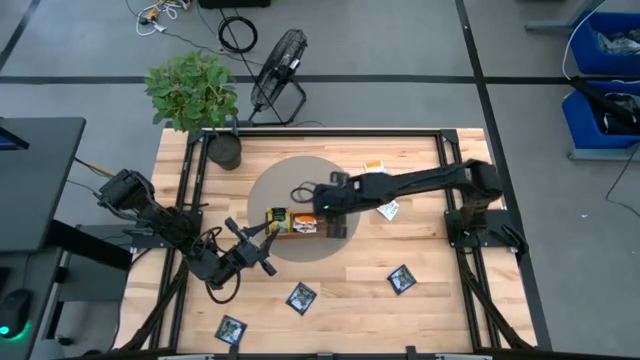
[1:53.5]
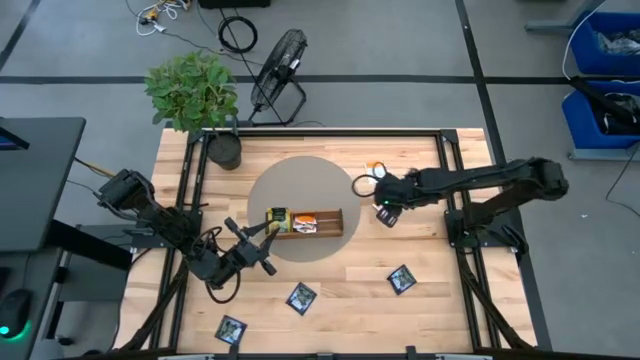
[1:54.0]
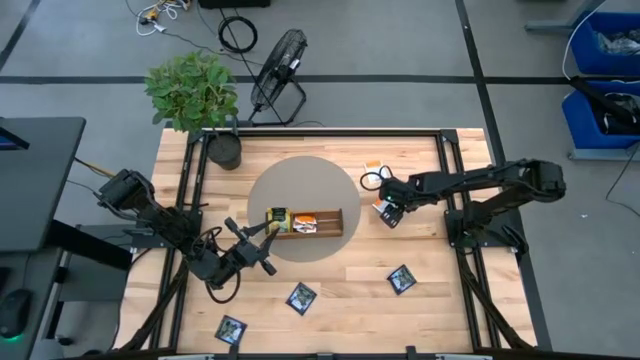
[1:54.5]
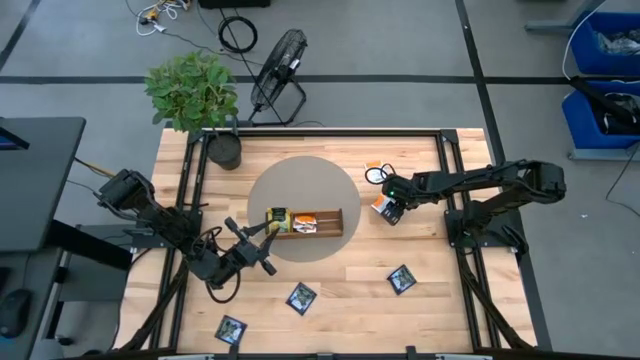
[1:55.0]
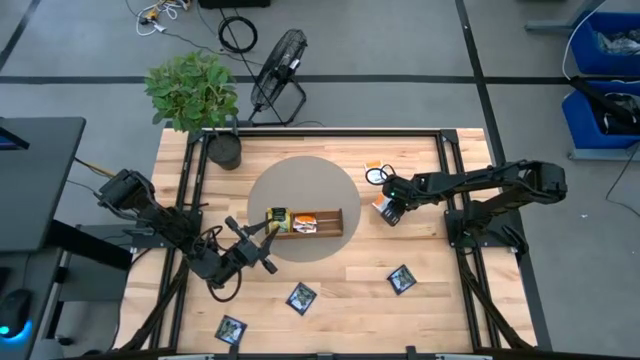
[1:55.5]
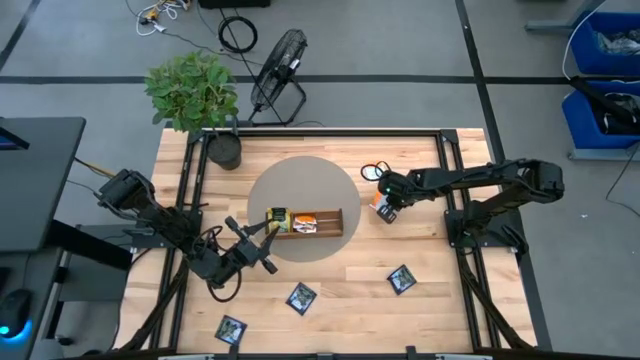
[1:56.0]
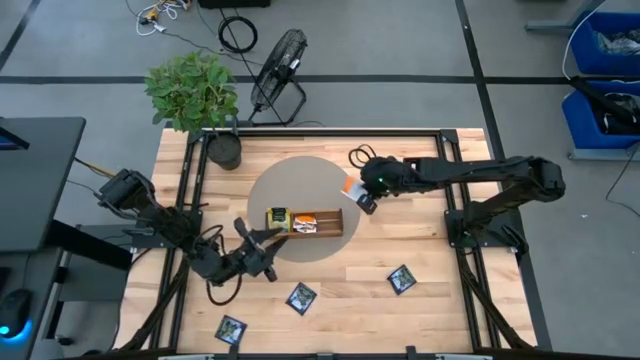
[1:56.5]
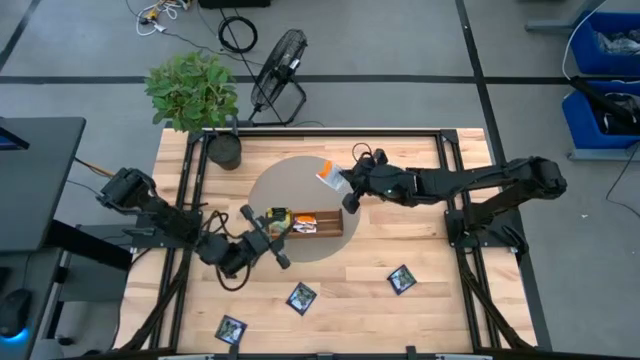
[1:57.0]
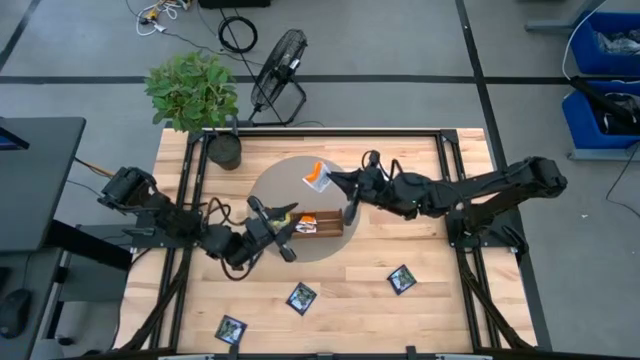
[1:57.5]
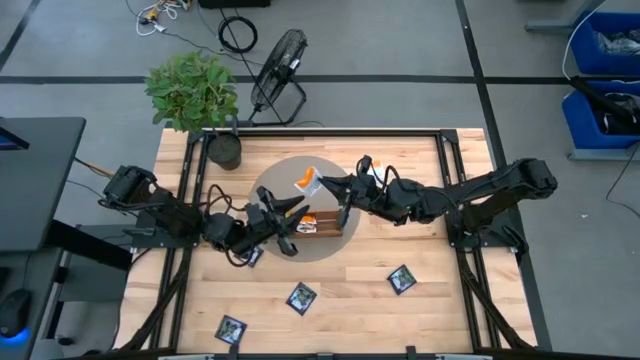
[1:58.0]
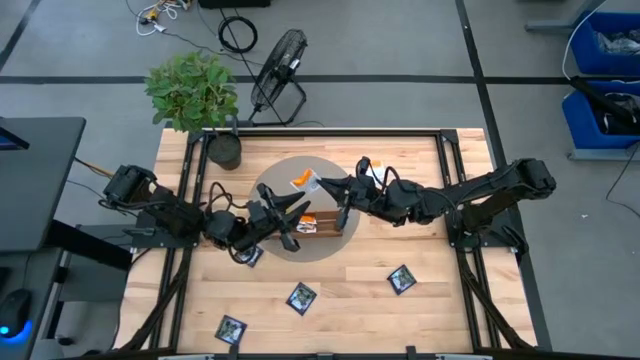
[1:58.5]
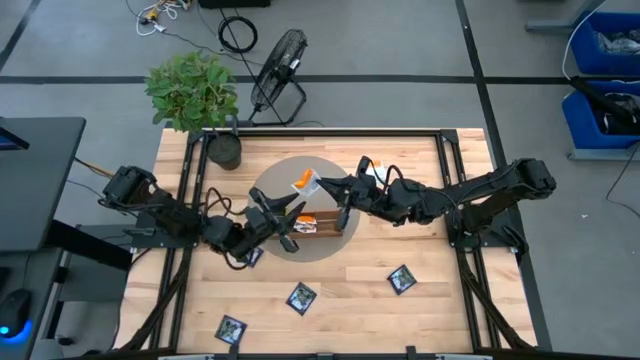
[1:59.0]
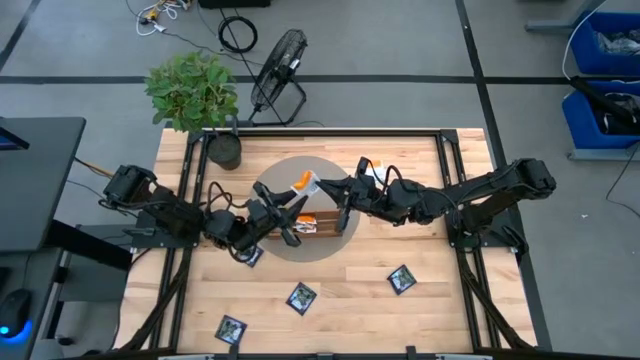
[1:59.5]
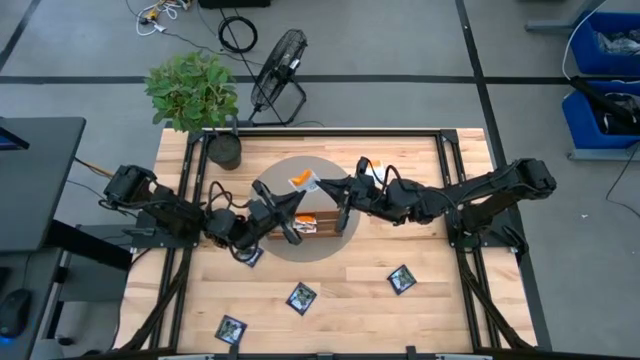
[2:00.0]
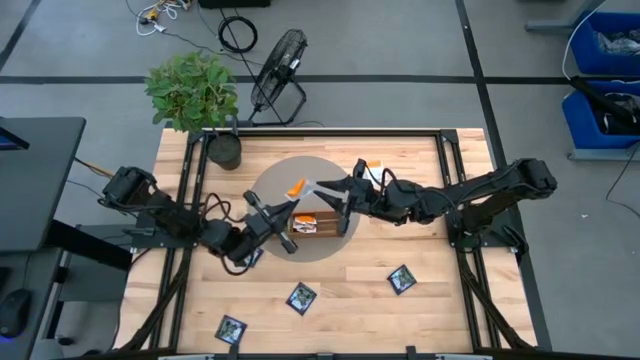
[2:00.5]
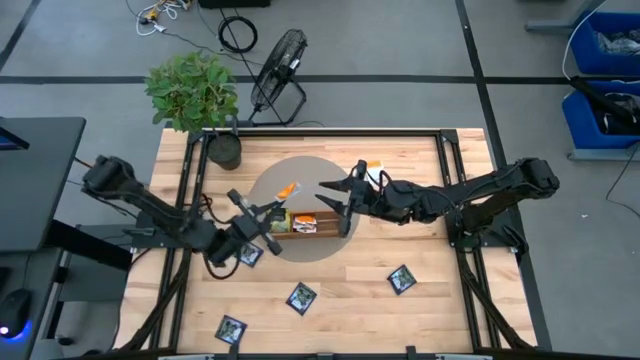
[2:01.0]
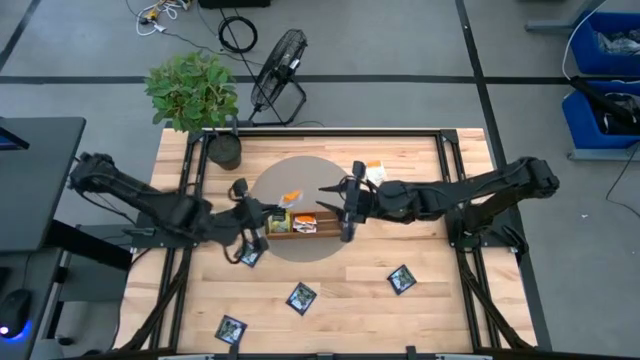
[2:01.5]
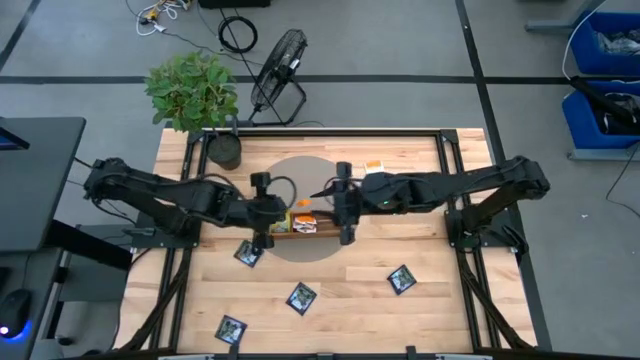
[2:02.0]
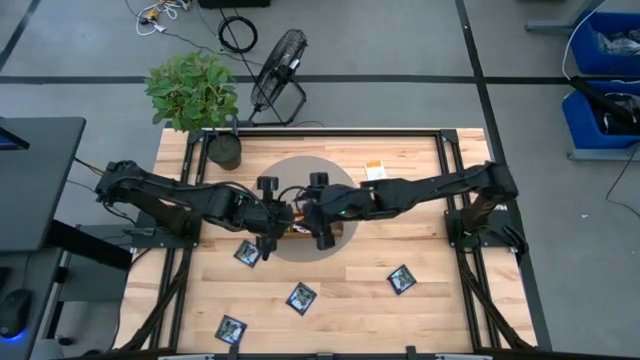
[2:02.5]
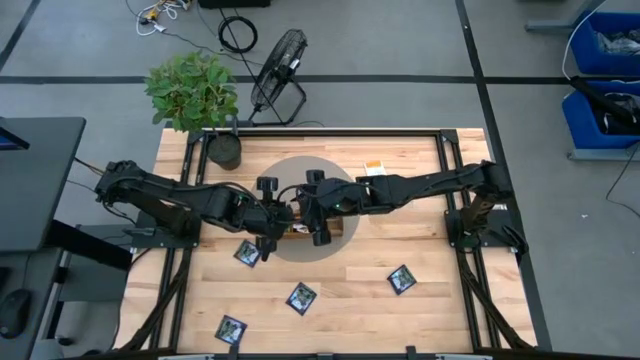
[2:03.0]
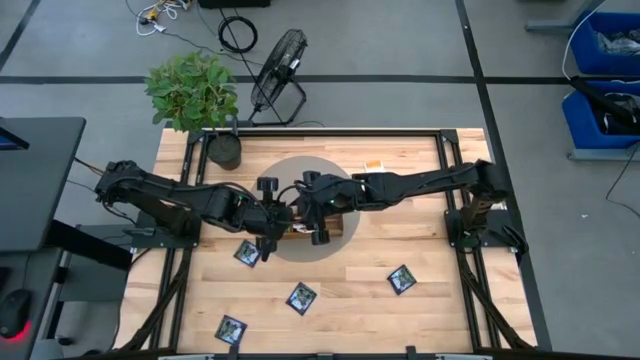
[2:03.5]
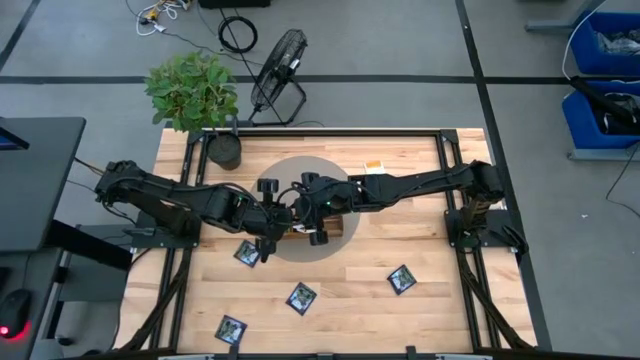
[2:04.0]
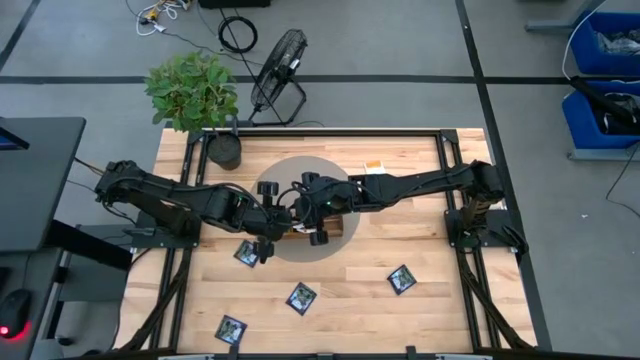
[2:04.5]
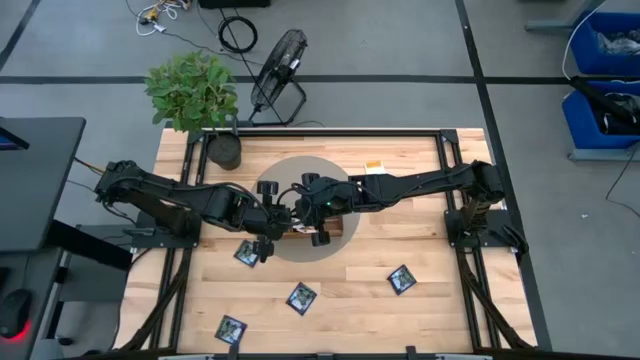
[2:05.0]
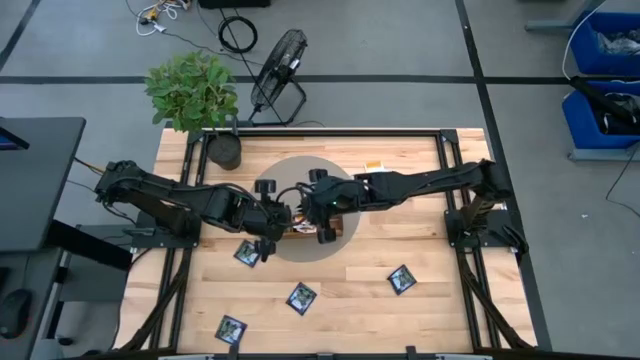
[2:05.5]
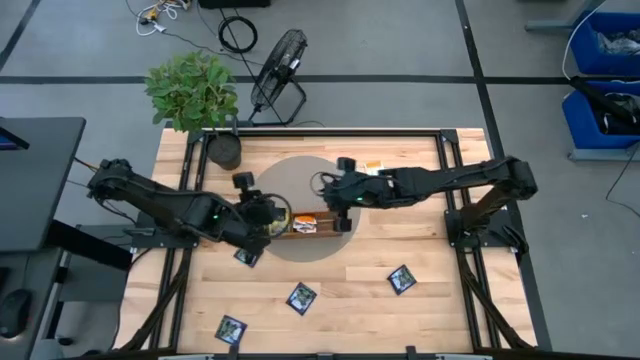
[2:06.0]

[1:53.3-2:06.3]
Task: Pick & Place Tea
Put the bottom orange tea bag into the wooden organizer

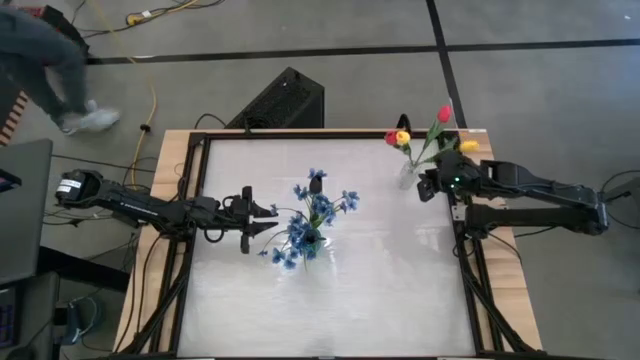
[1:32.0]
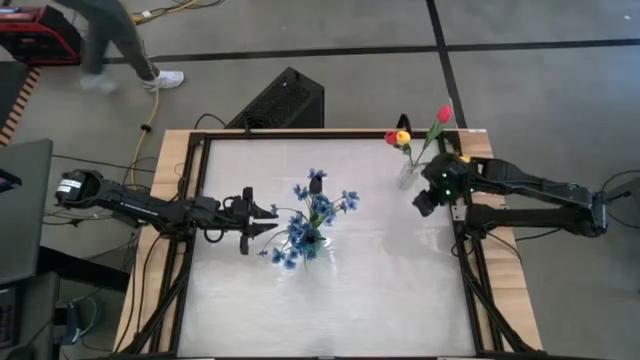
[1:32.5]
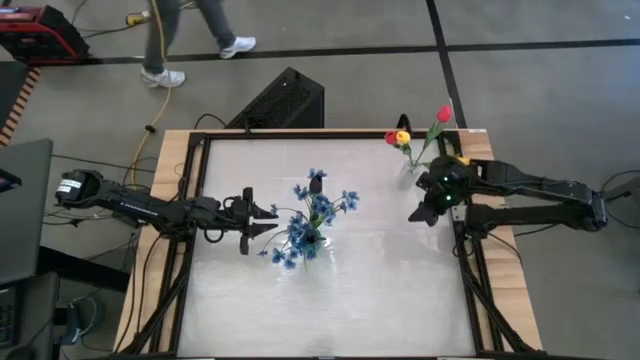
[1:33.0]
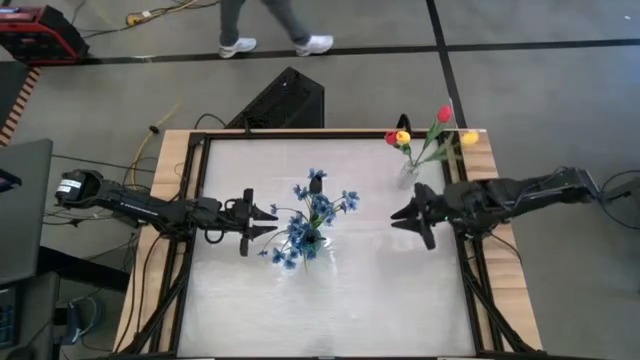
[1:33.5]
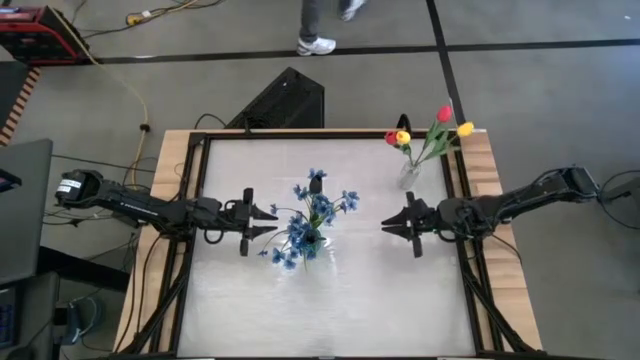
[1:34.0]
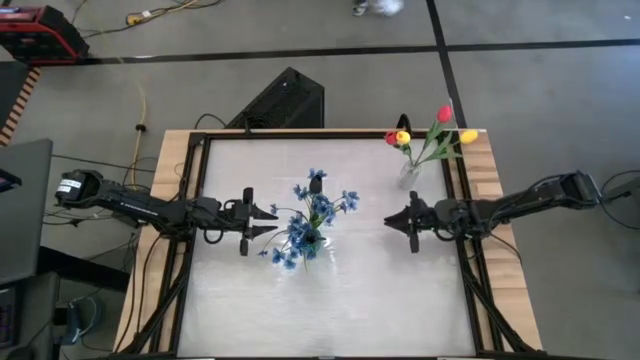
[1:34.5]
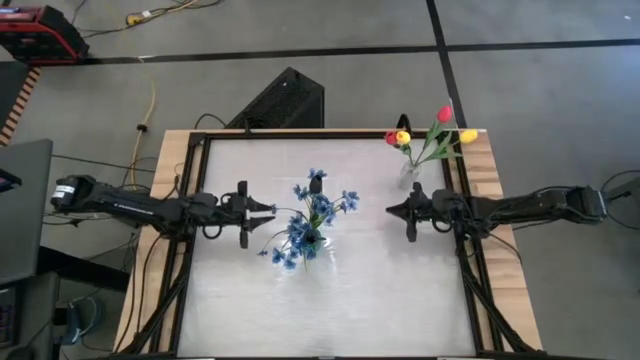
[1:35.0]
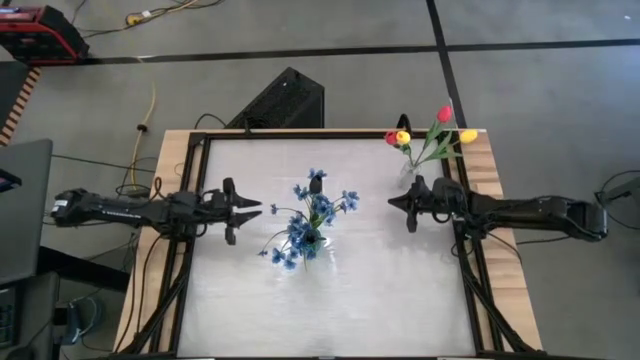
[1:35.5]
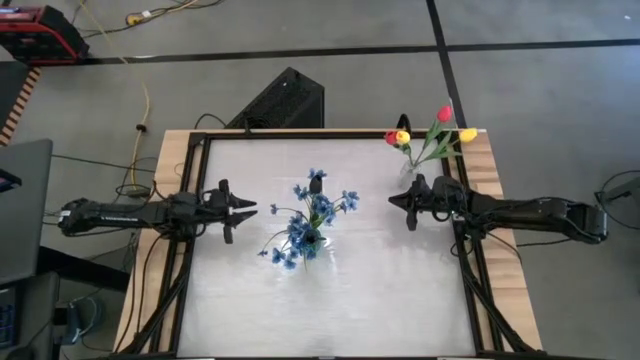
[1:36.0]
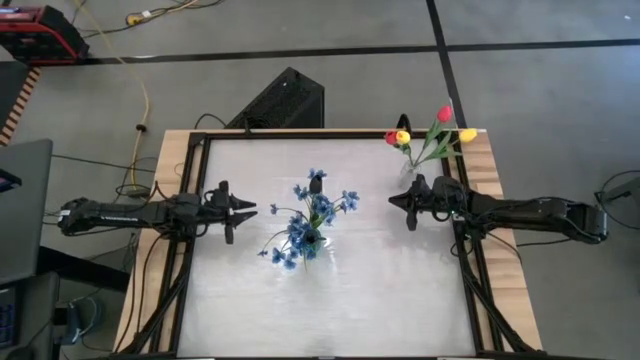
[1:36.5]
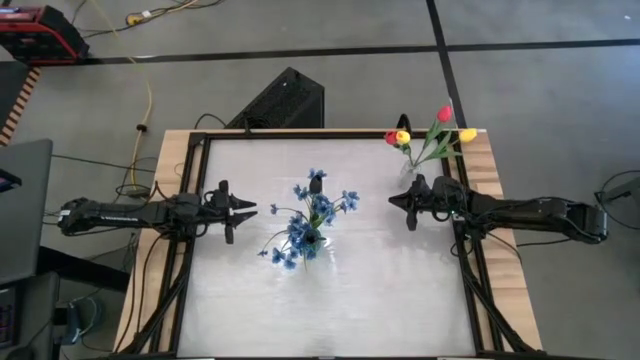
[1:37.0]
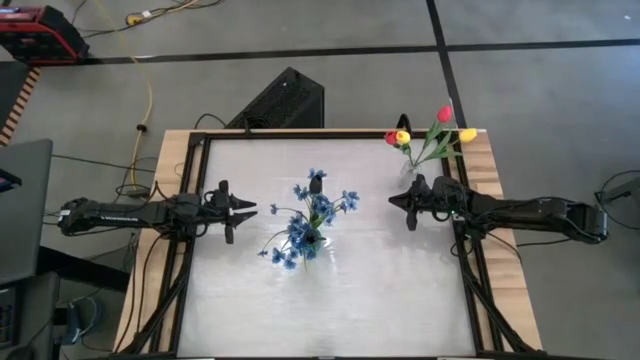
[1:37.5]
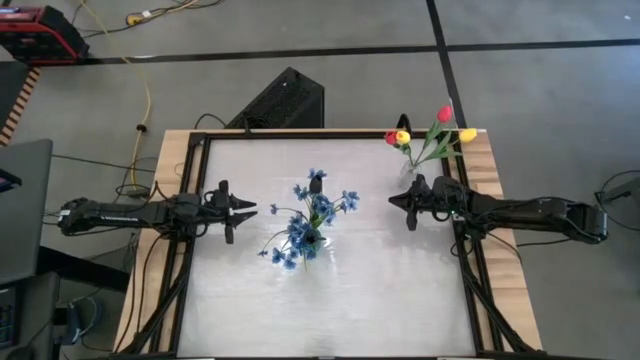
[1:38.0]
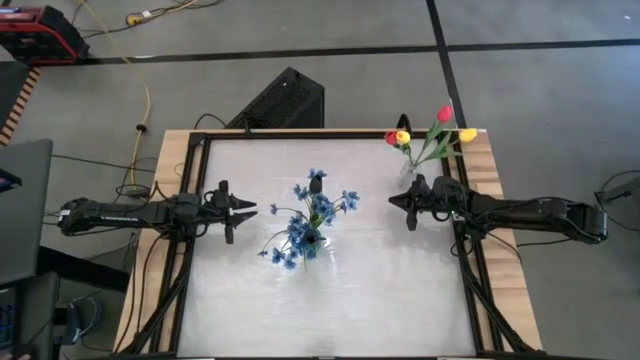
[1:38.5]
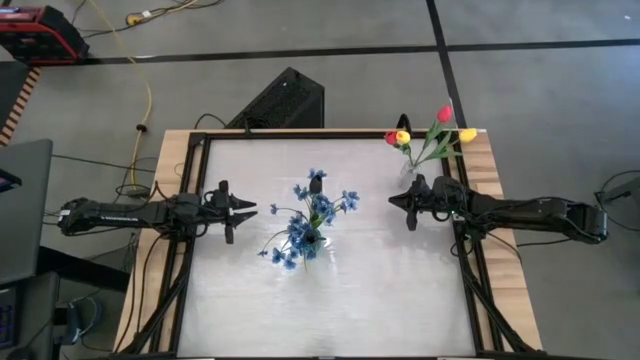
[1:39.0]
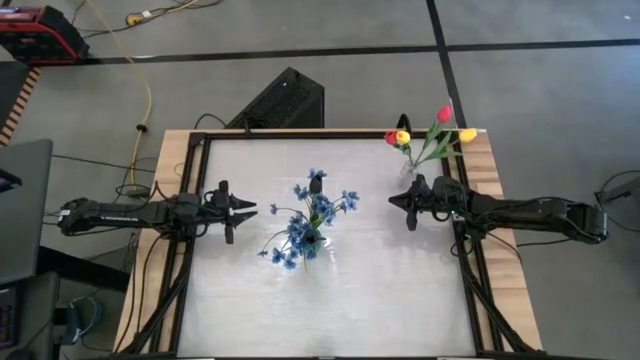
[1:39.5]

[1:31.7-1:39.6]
Task: Sort flowers into vase by color
Return to Home Position

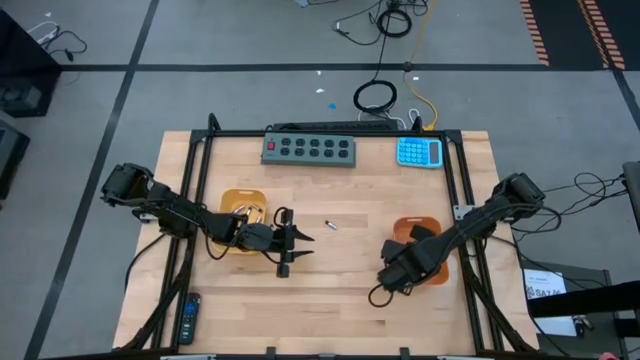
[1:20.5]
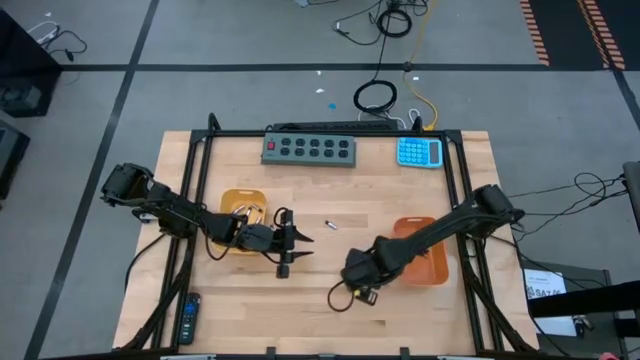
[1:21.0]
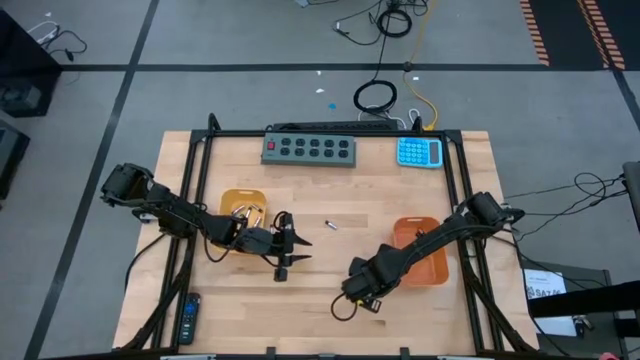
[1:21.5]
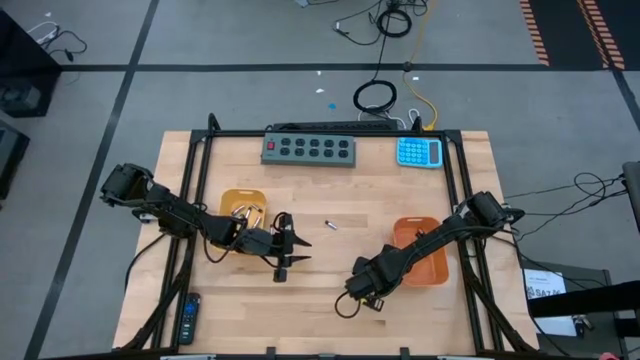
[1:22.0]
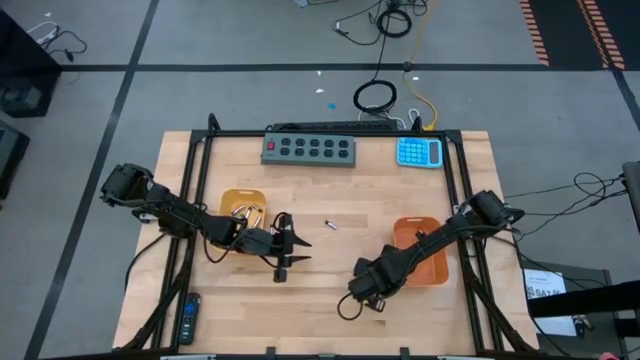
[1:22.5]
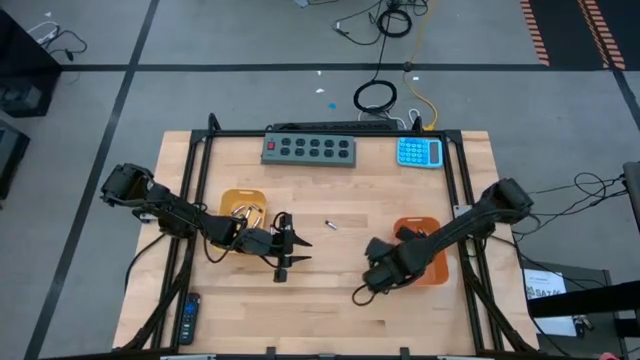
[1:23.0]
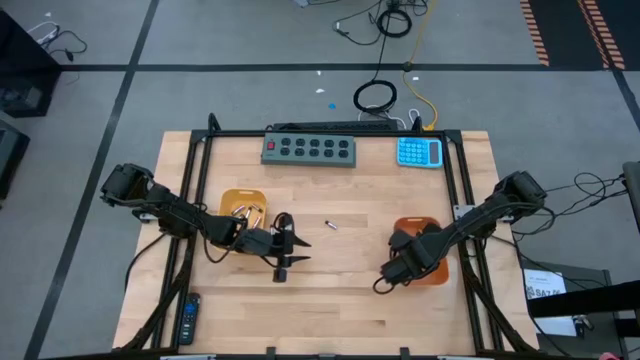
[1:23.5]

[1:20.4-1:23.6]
Task: Sort batteries
Put the black battery into the orange bin
